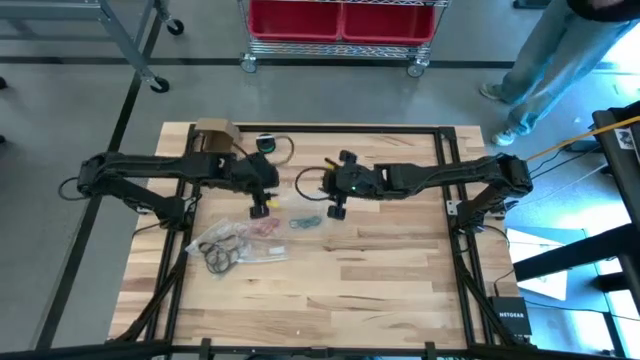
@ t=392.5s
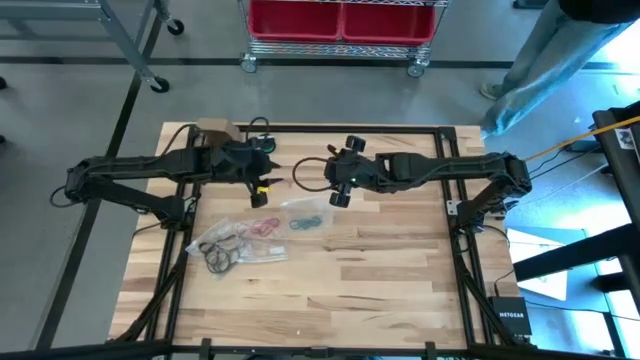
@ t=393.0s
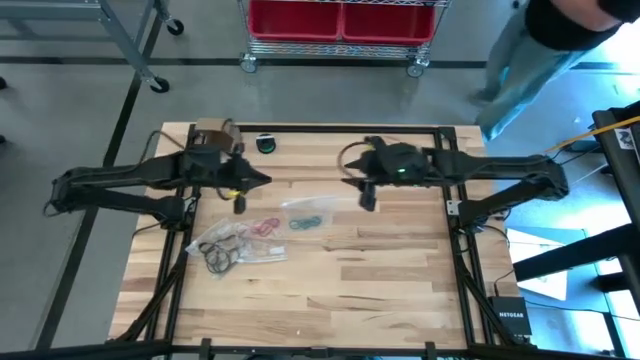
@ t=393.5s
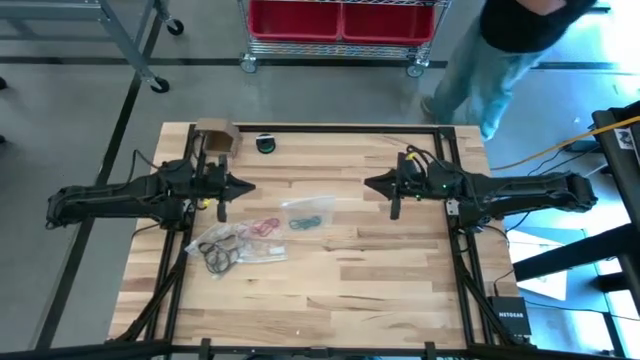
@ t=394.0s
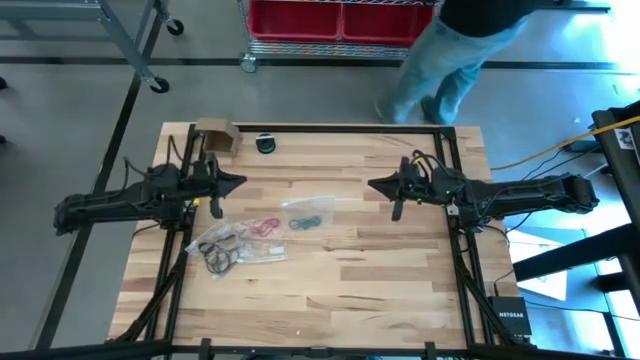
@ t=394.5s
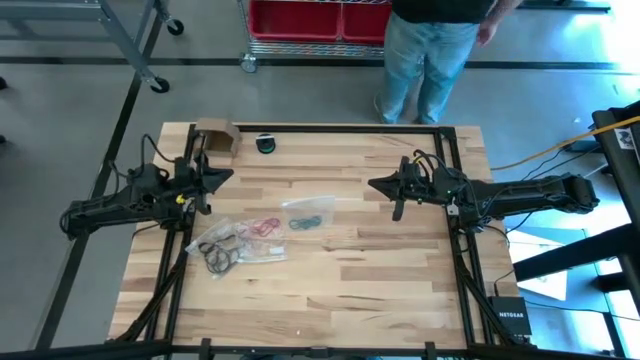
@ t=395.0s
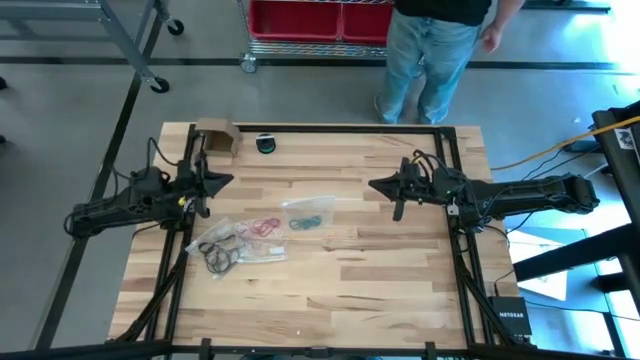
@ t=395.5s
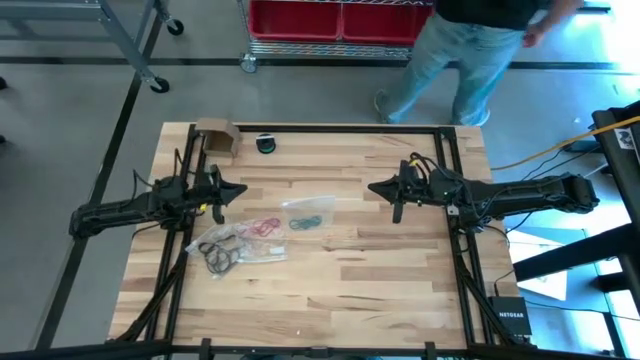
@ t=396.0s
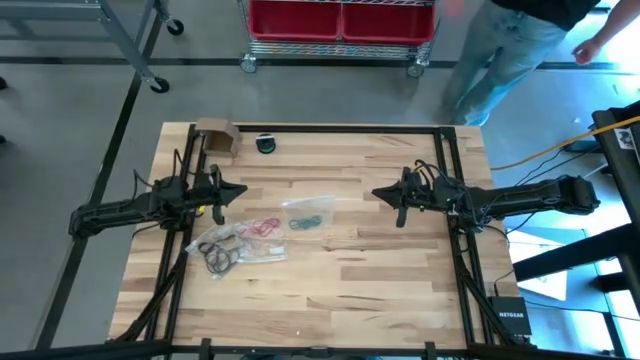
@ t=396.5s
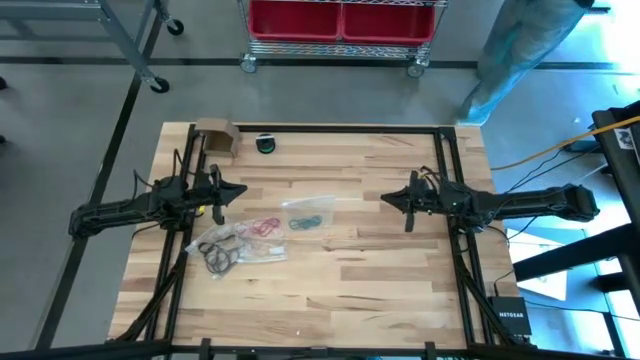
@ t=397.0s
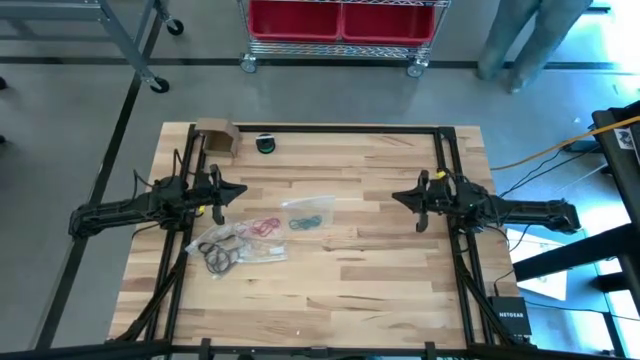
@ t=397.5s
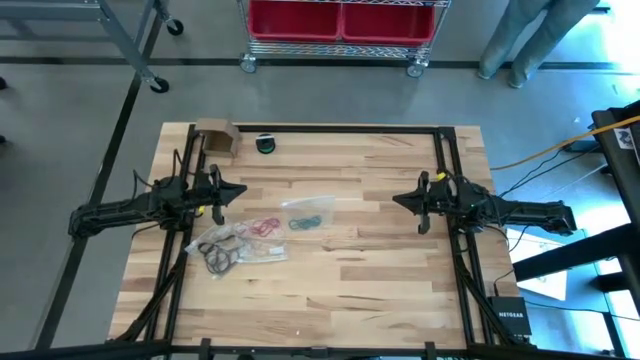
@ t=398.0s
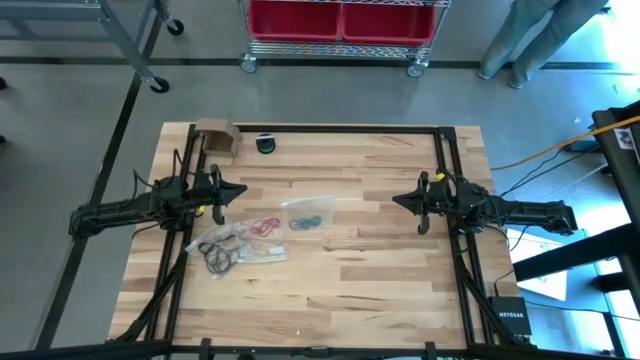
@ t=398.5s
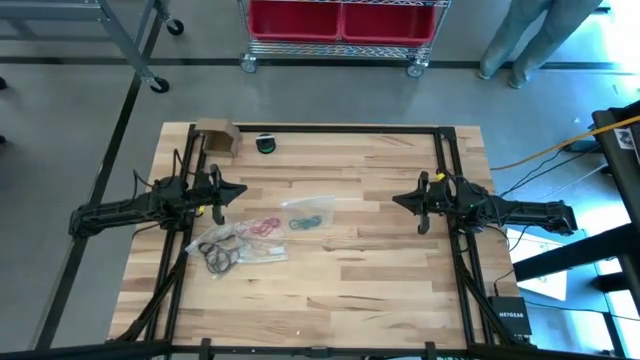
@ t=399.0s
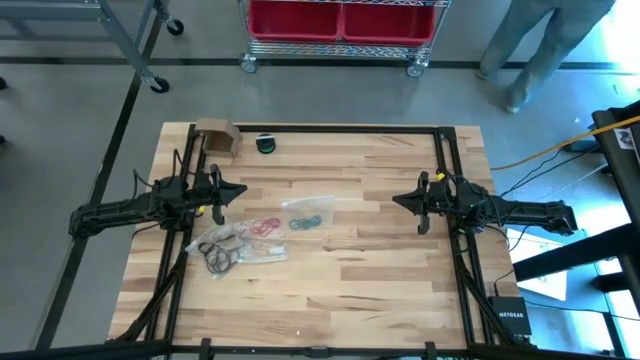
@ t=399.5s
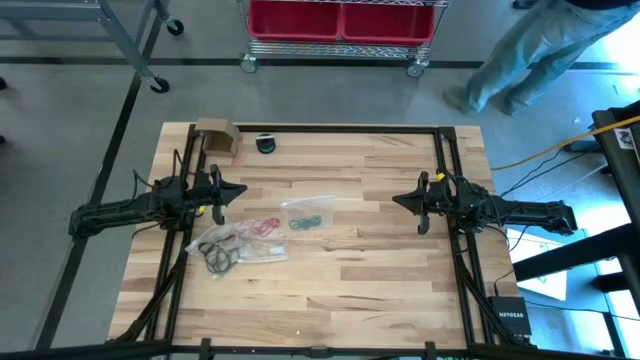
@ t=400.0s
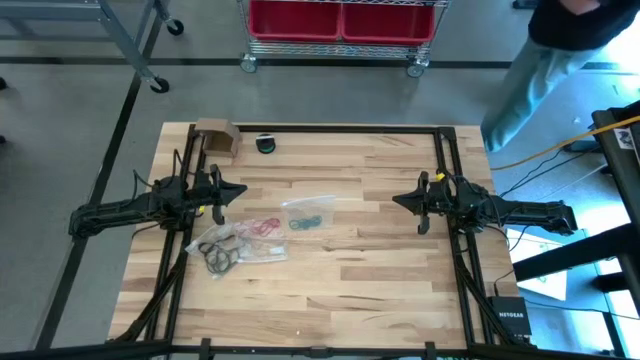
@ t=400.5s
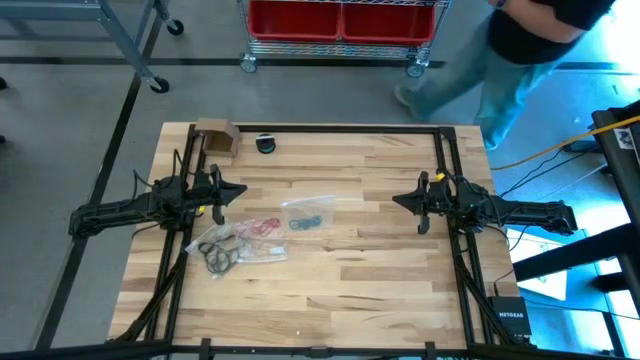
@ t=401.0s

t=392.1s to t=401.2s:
Task: Sort rubber bands
Return to Home Position

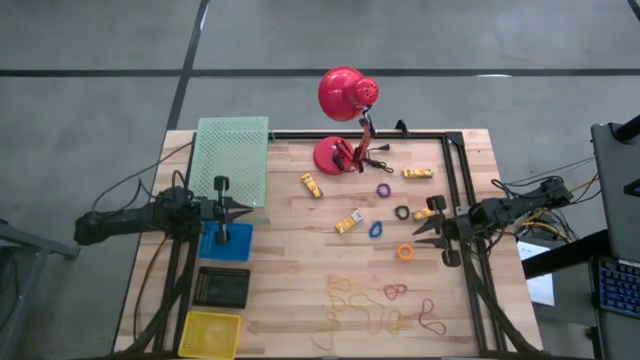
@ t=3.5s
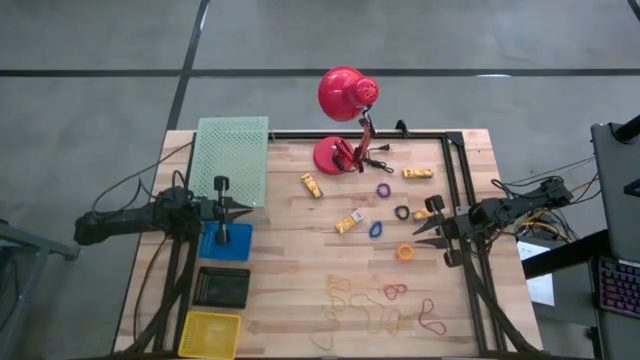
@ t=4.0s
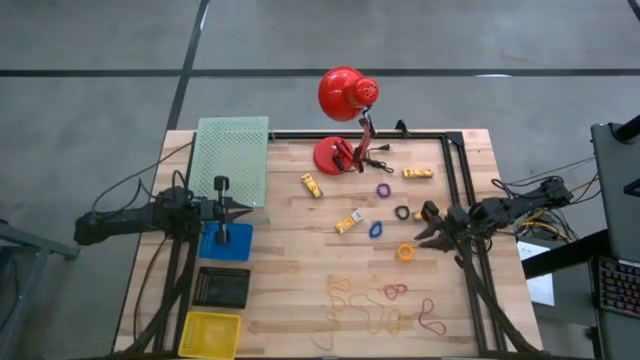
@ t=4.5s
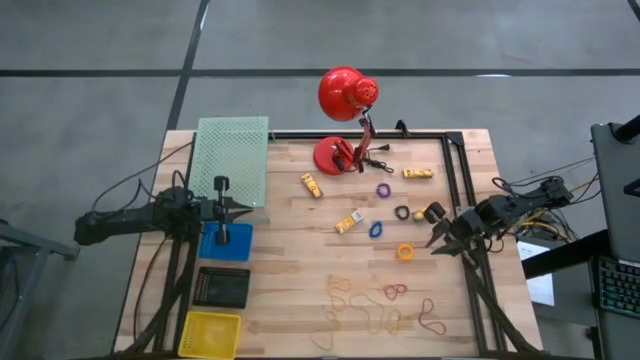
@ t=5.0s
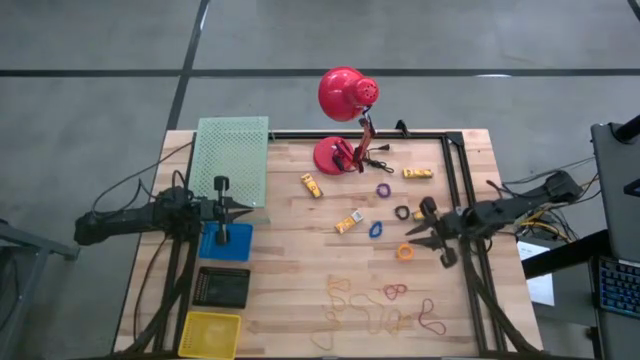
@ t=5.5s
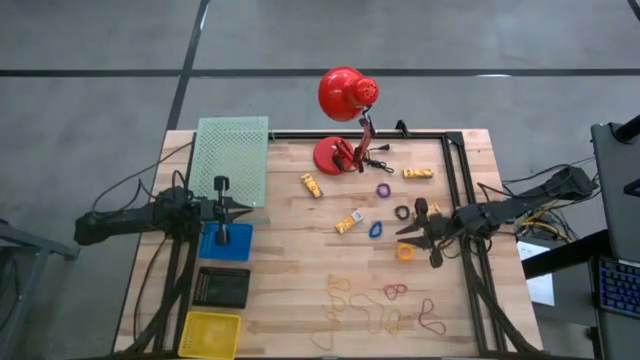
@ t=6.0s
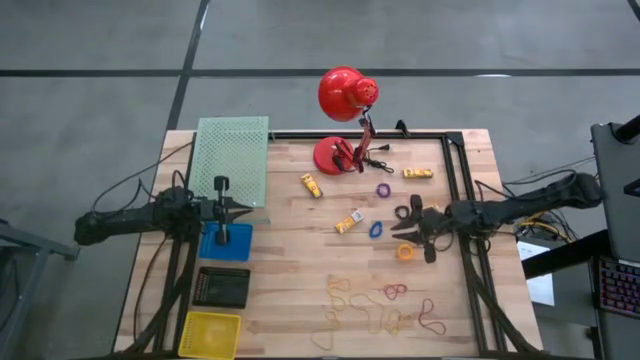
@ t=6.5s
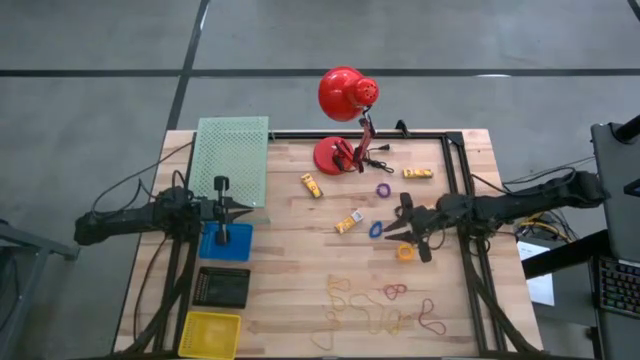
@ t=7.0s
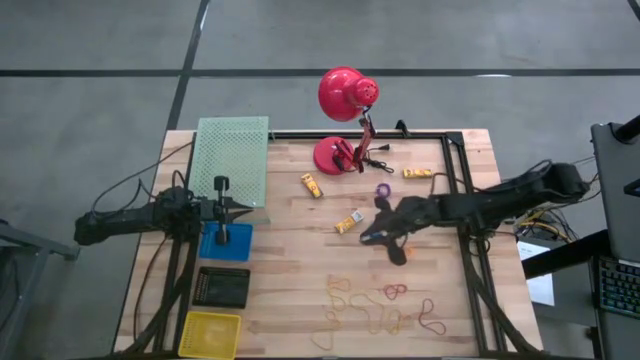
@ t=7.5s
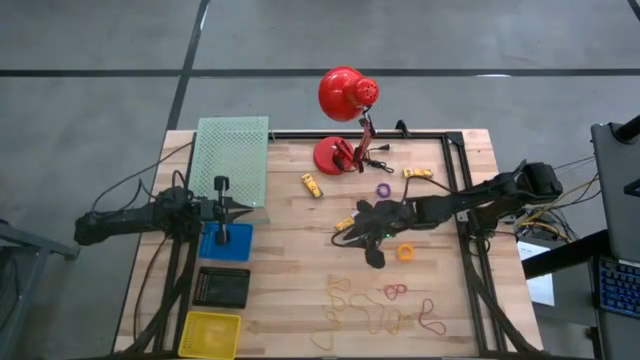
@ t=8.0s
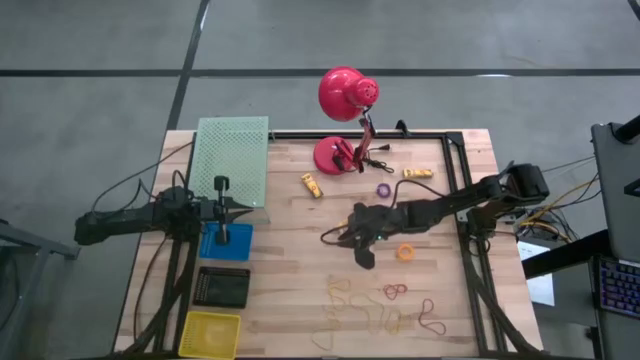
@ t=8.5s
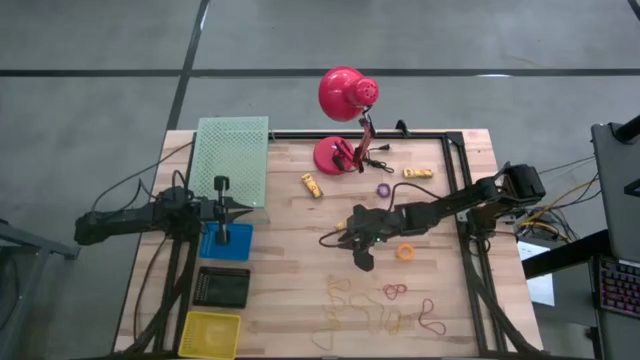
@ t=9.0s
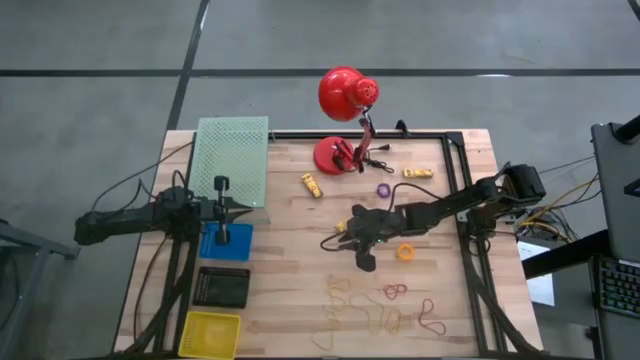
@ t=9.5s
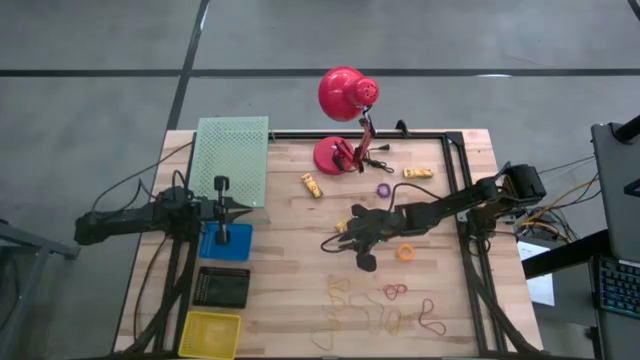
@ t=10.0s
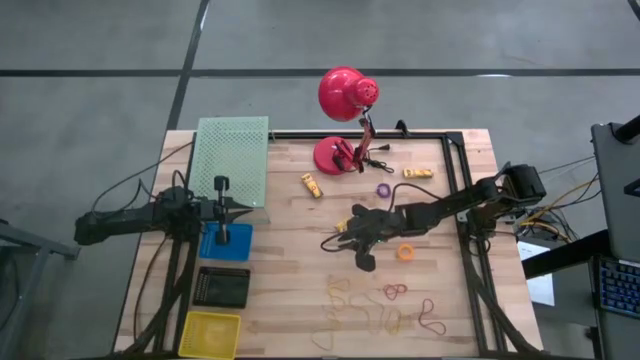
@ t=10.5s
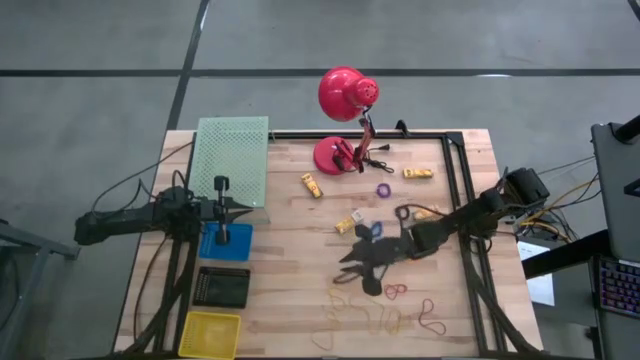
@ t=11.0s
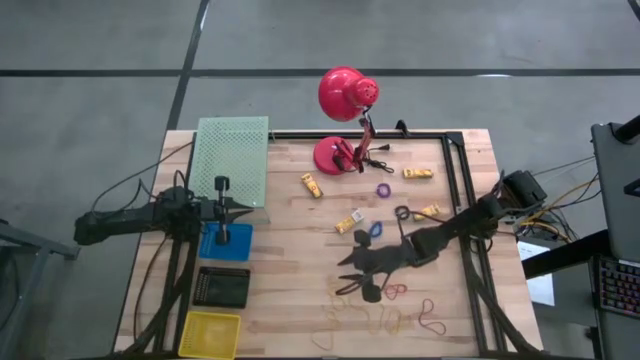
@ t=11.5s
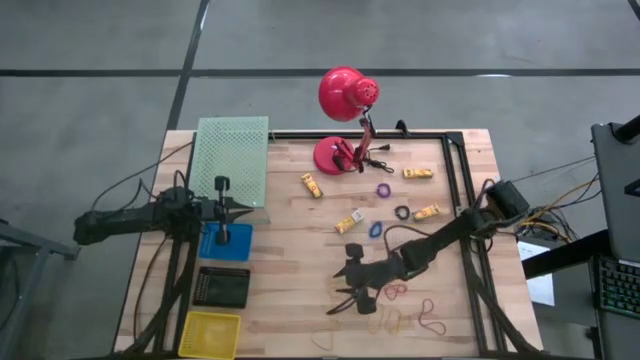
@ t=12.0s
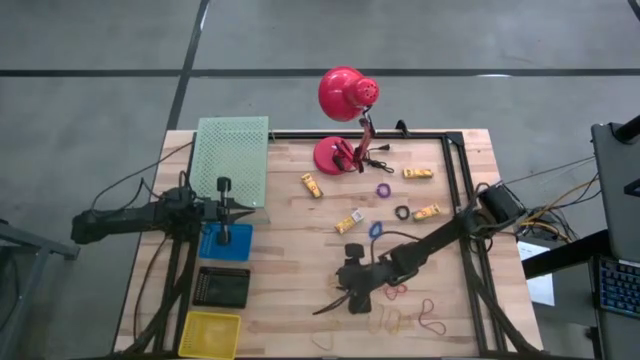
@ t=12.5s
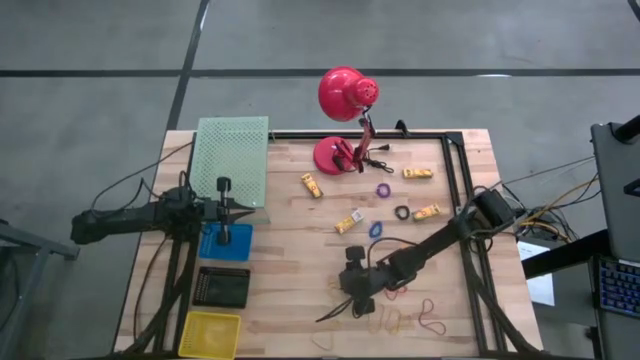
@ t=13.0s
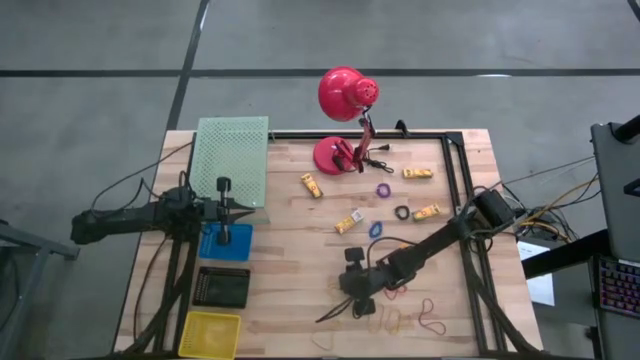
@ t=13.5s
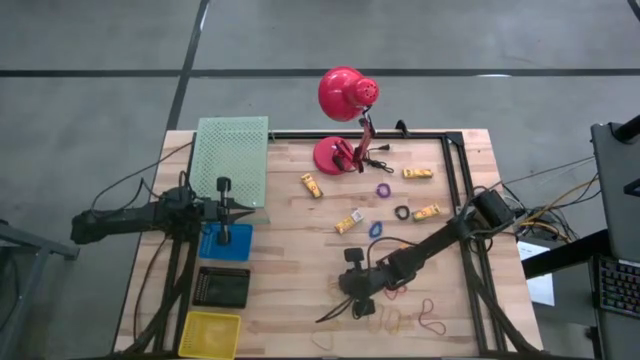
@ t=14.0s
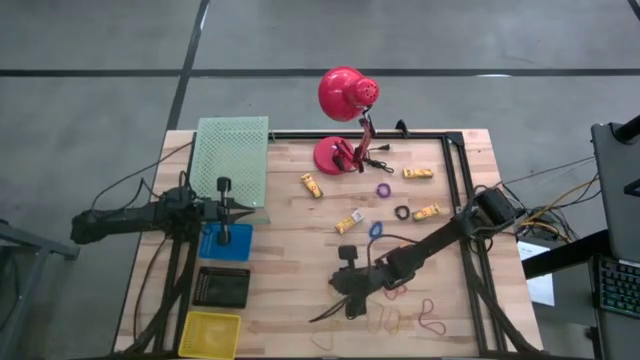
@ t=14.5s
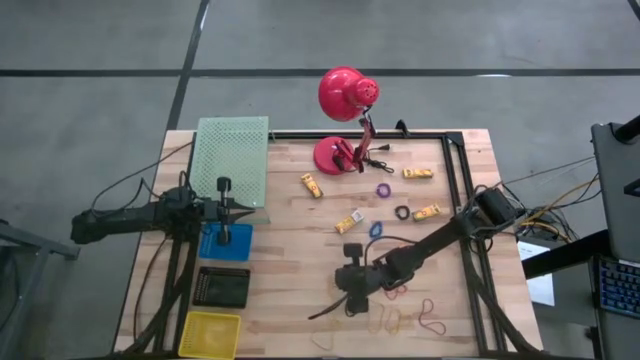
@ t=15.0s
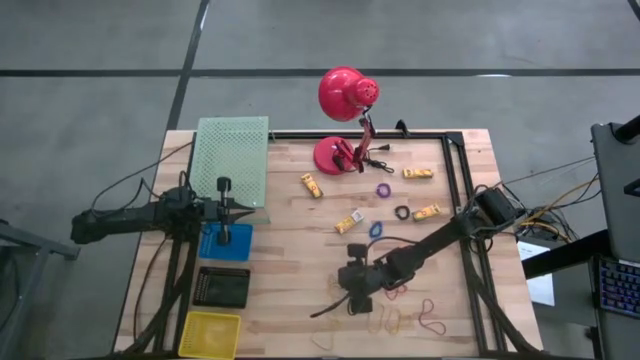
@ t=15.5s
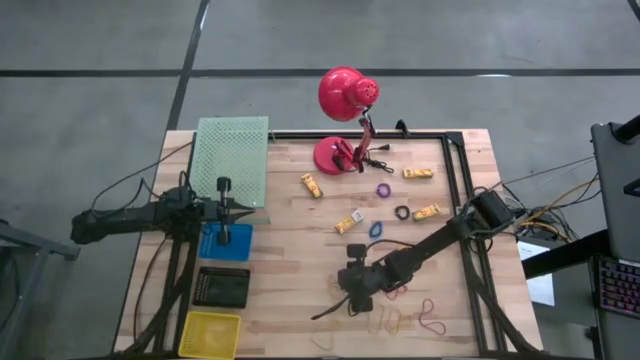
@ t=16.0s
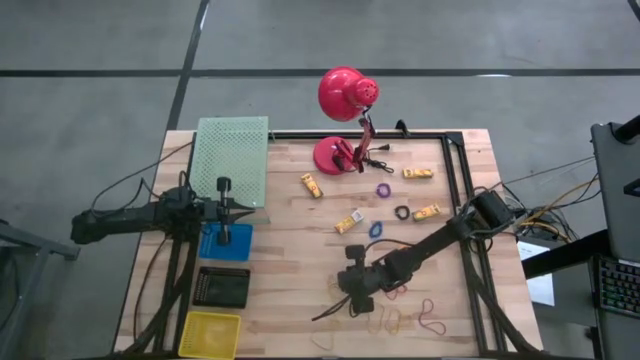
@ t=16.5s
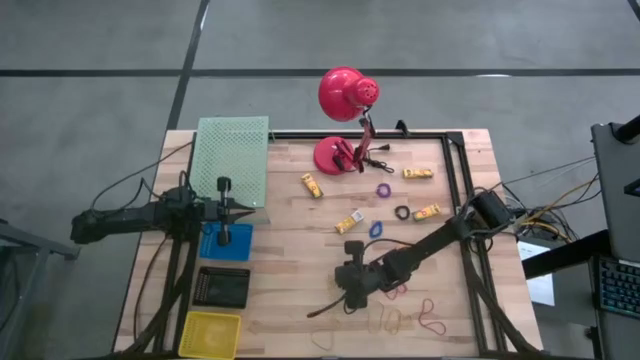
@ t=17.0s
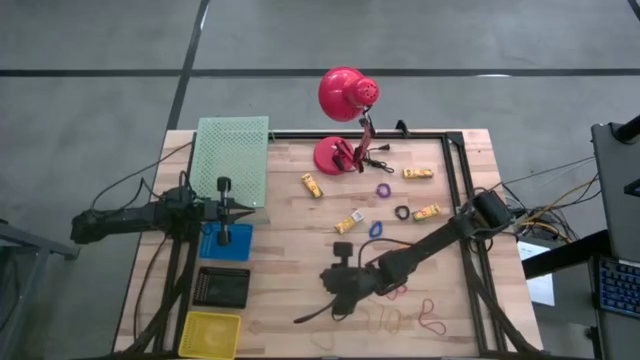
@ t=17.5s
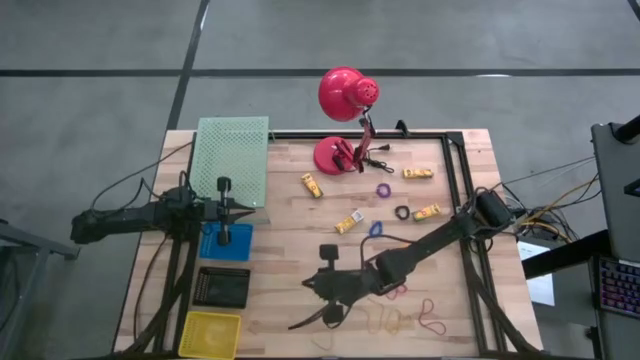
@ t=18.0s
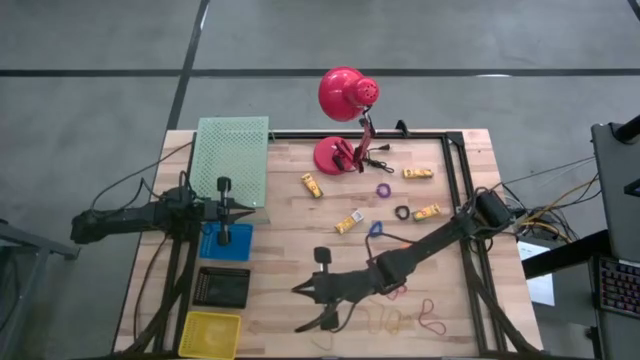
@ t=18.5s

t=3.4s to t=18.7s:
Task: Pick & Place Office Desk Supplies
Put the yellow rubber band into the yellow bin
